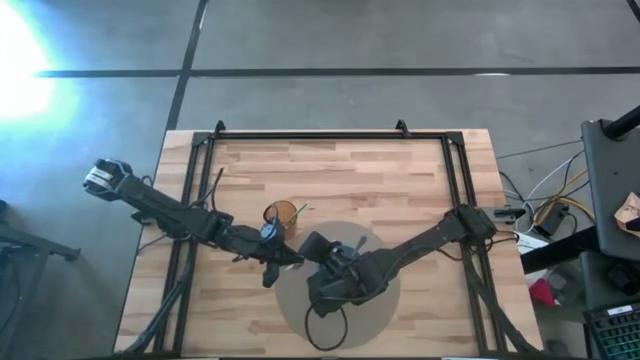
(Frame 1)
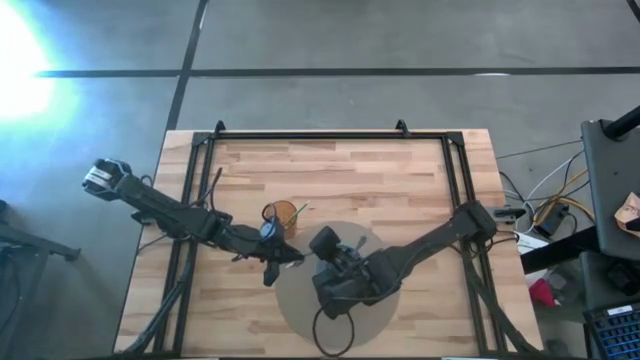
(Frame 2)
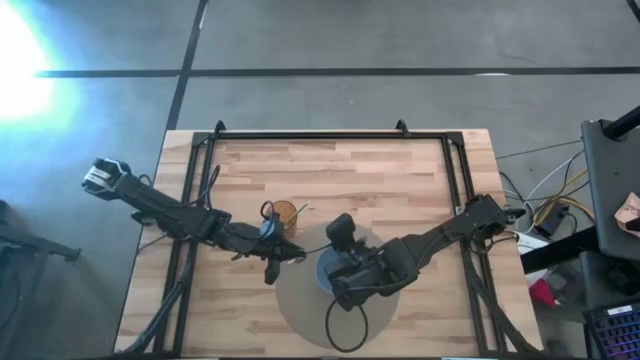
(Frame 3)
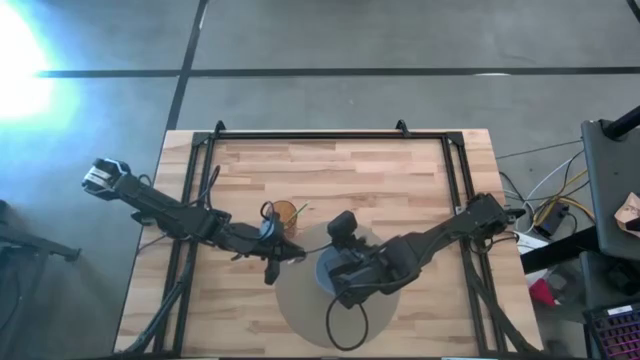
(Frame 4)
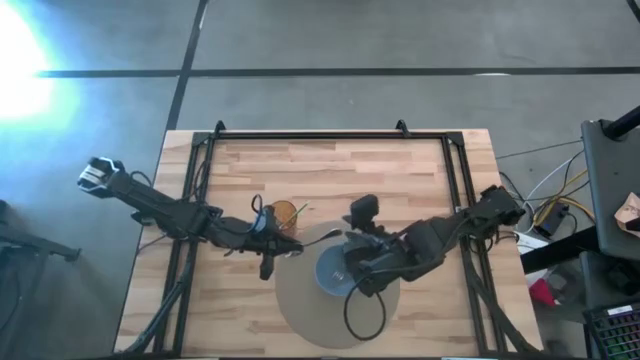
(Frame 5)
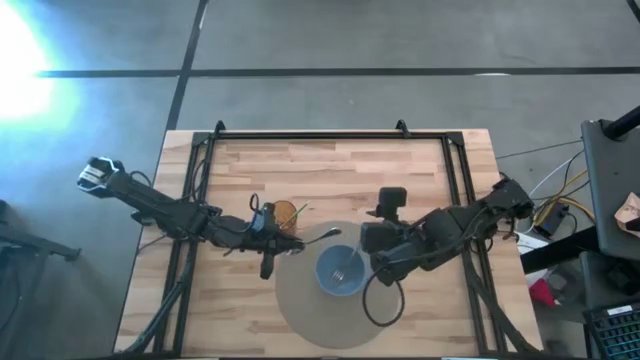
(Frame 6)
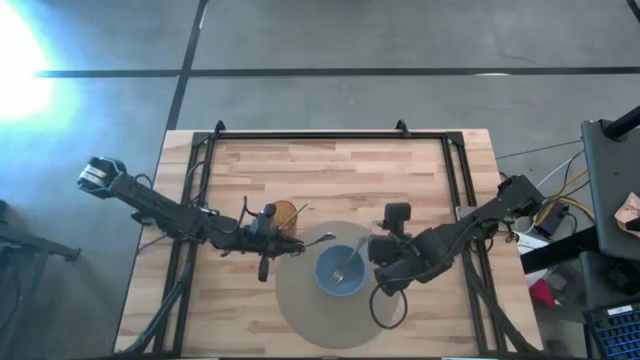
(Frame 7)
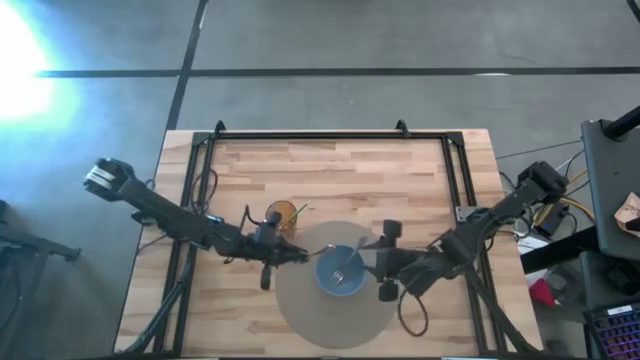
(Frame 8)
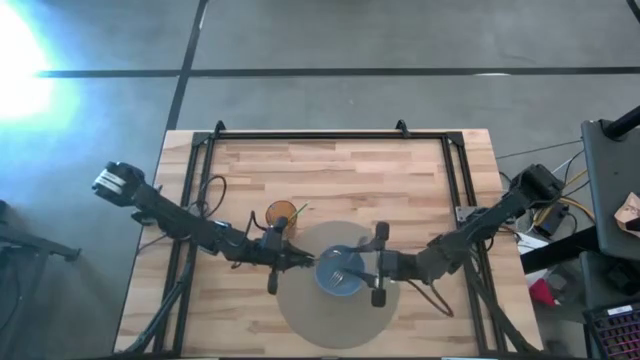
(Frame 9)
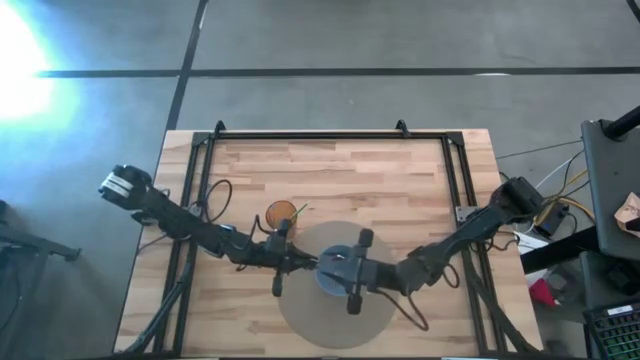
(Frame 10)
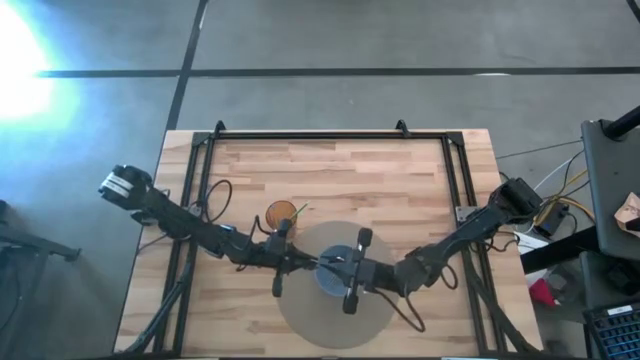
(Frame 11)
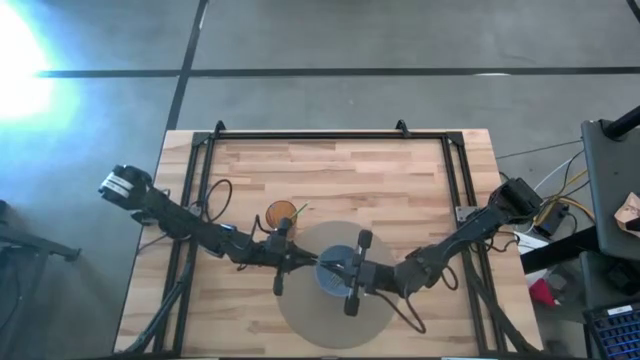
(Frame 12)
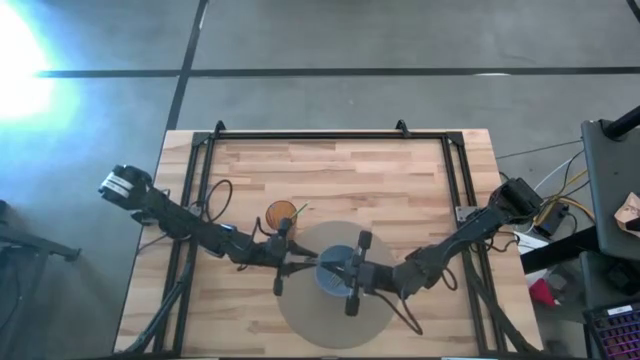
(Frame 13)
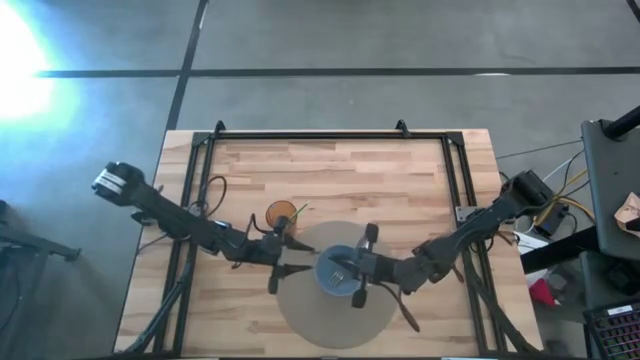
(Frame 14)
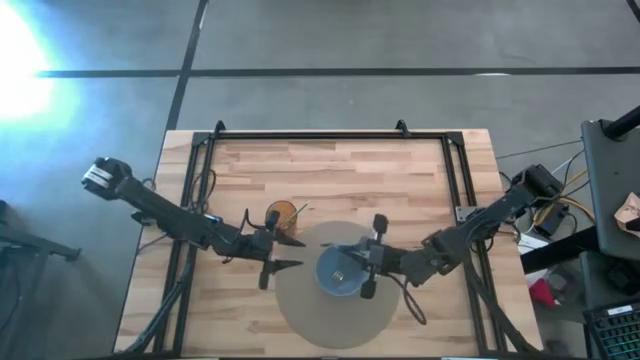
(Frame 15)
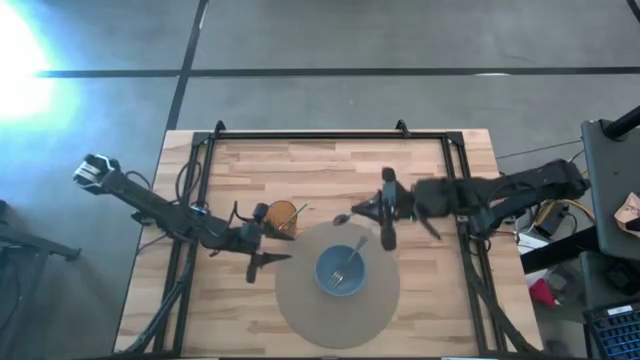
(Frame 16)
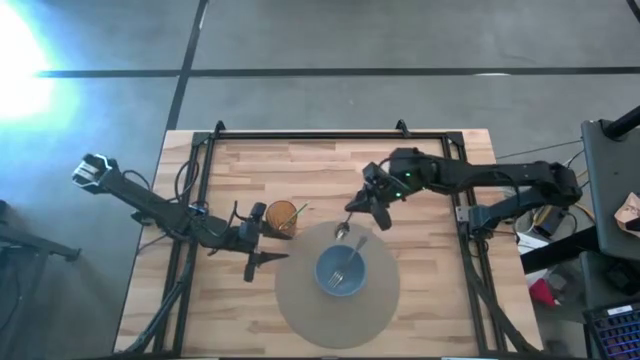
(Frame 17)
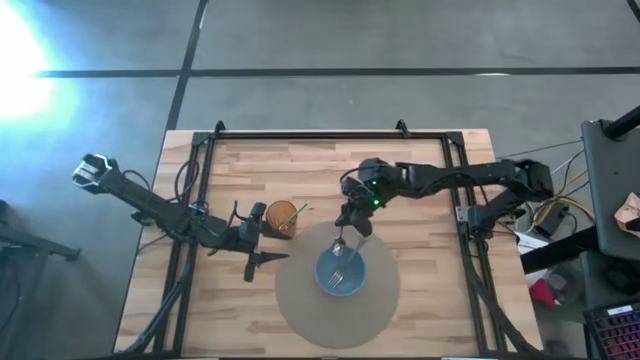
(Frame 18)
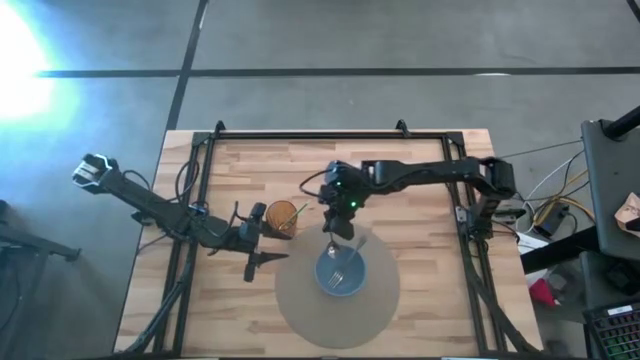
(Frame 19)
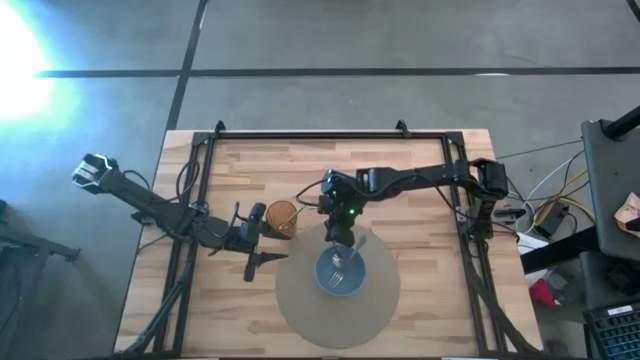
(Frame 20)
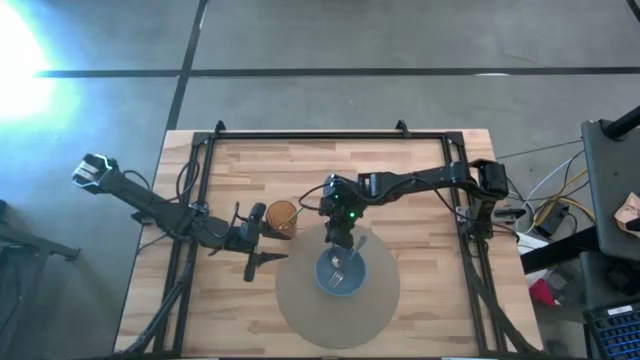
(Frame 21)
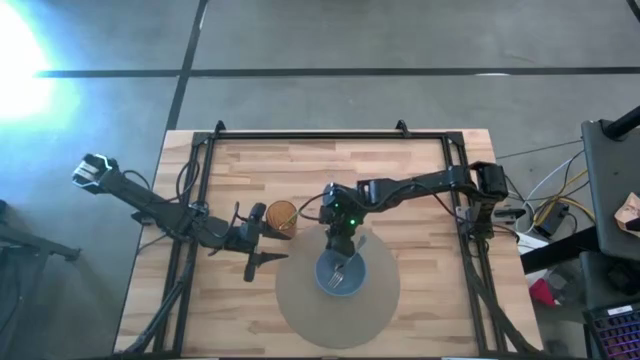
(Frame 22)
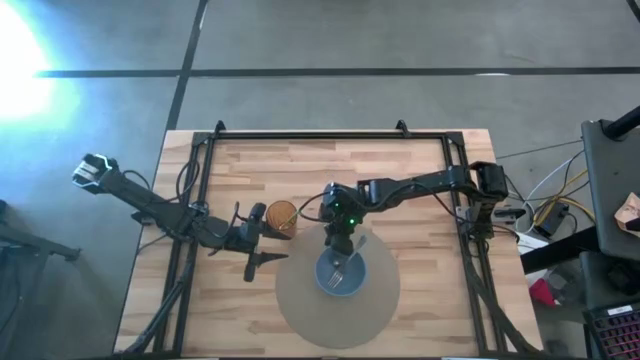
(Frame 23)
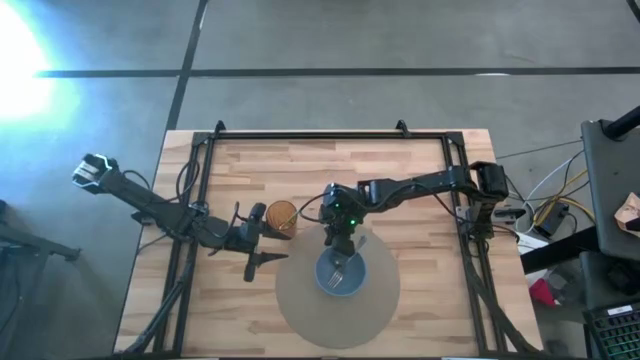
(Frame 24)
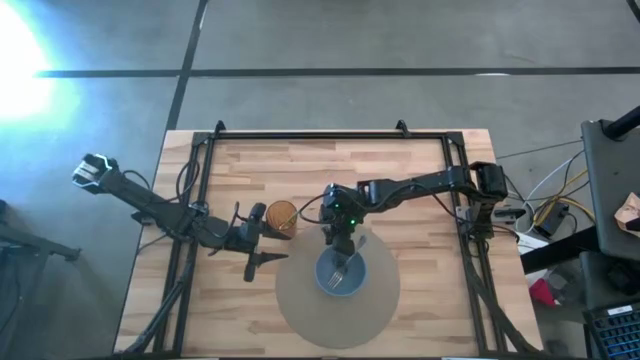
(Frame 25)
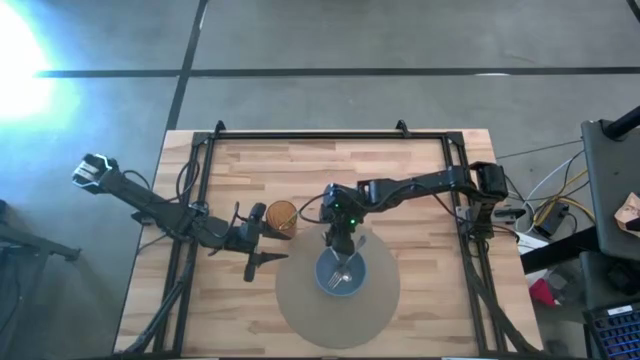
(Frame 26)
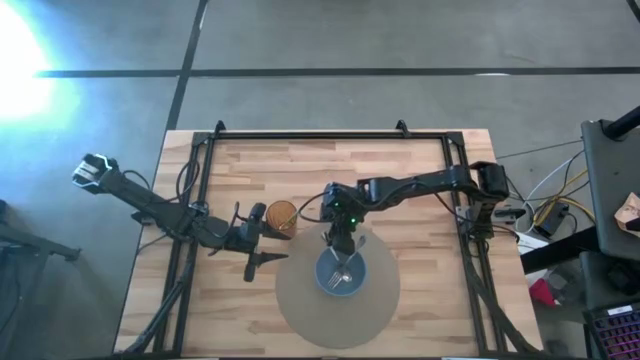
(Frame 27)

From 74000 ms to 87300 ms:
Task: Pick & Place Utensil
Put the silver spoon into the blue bowl

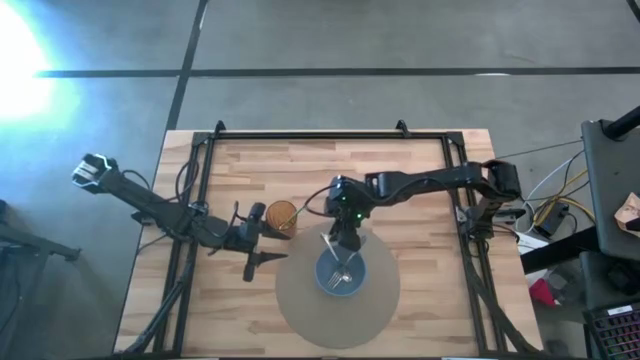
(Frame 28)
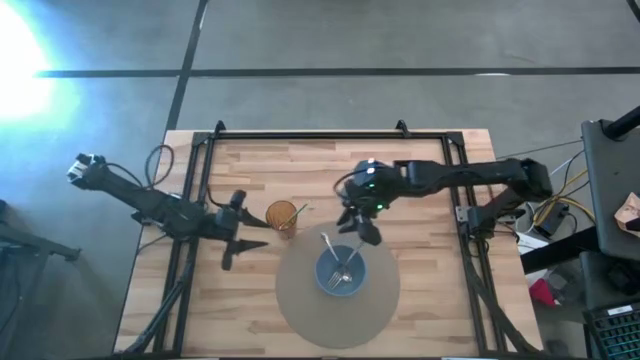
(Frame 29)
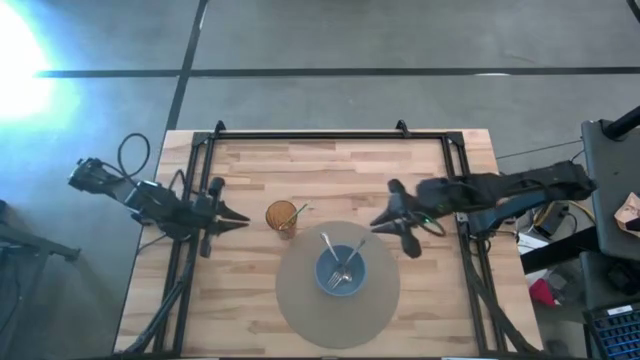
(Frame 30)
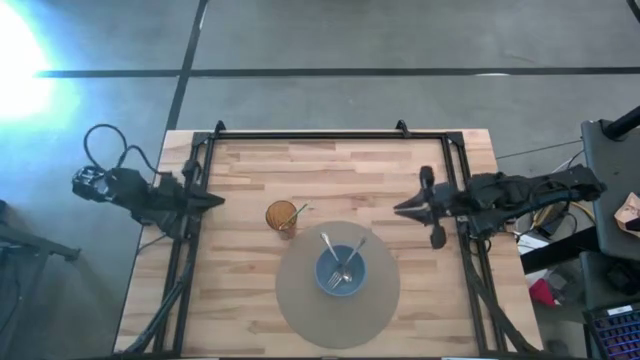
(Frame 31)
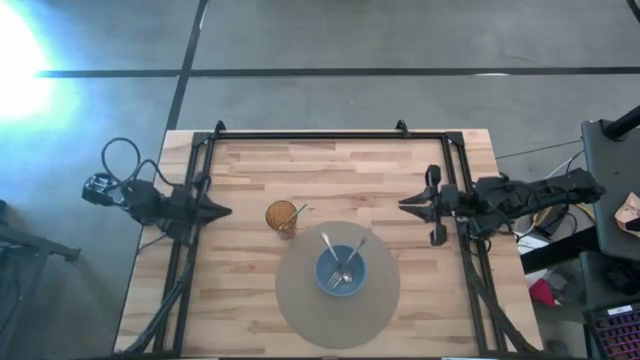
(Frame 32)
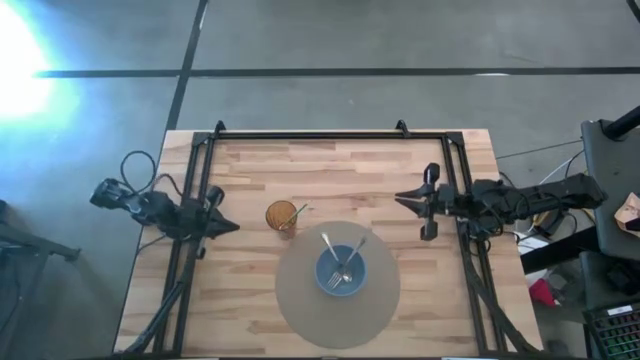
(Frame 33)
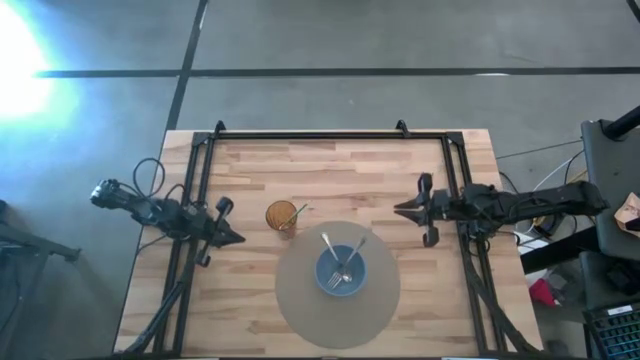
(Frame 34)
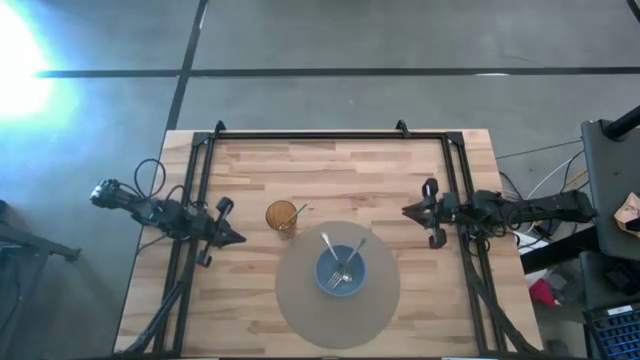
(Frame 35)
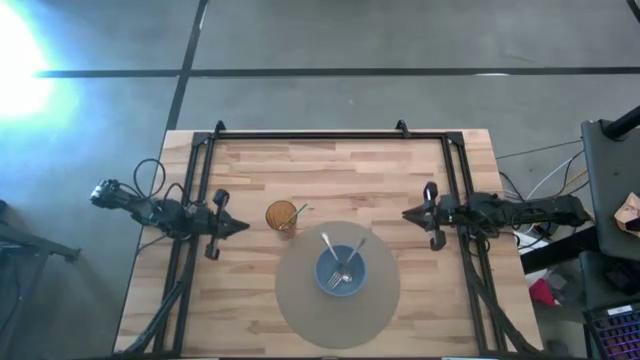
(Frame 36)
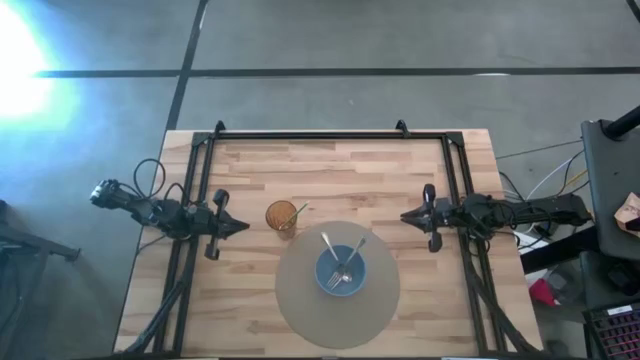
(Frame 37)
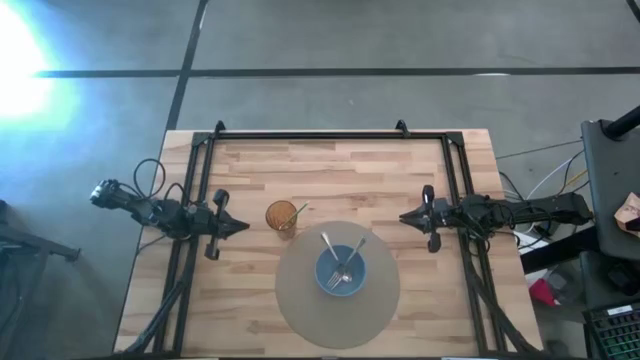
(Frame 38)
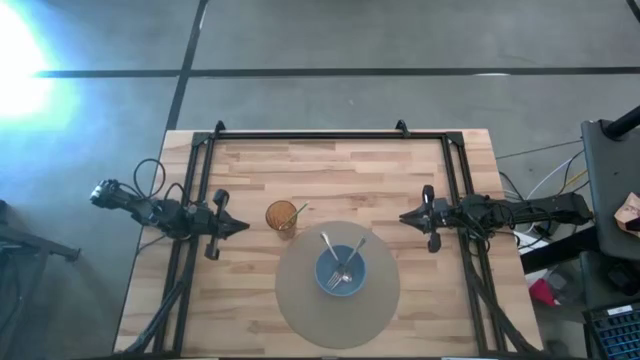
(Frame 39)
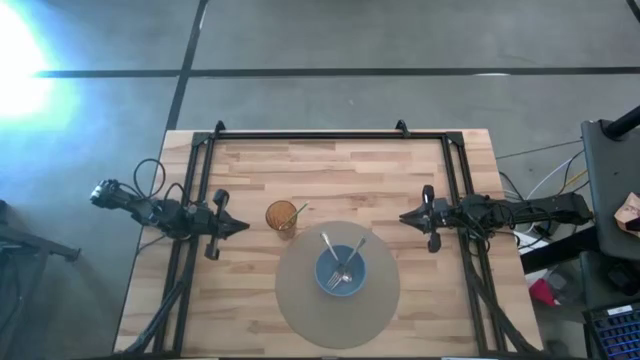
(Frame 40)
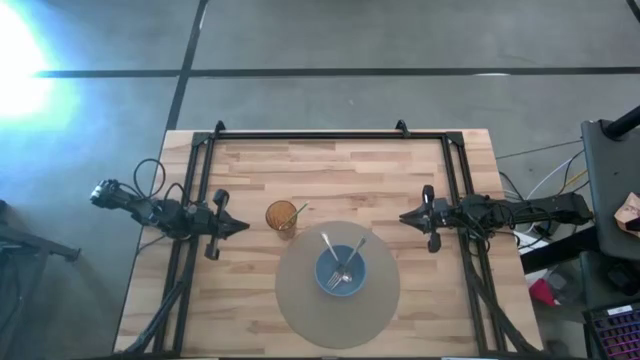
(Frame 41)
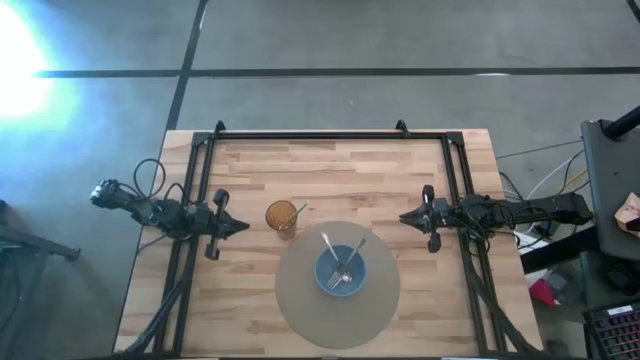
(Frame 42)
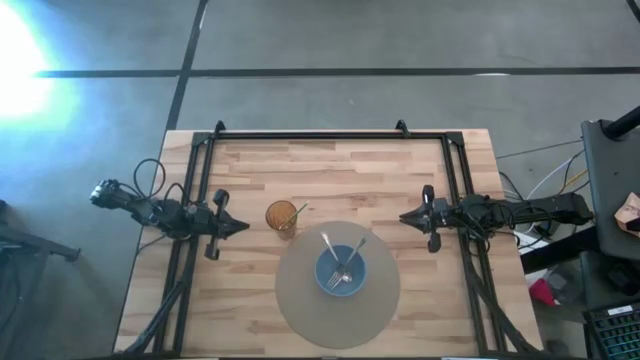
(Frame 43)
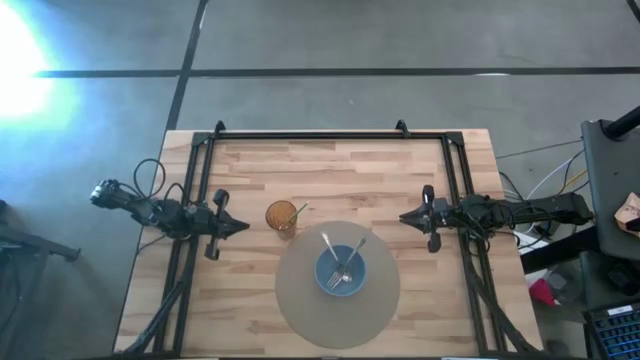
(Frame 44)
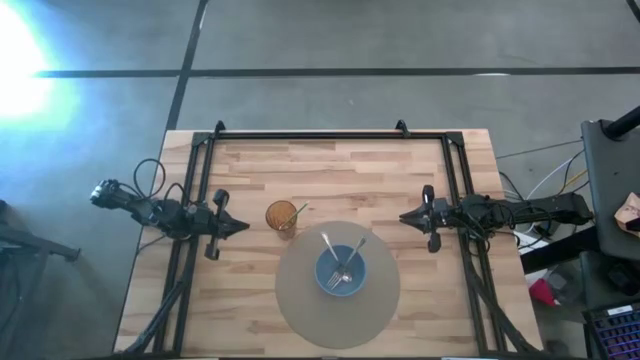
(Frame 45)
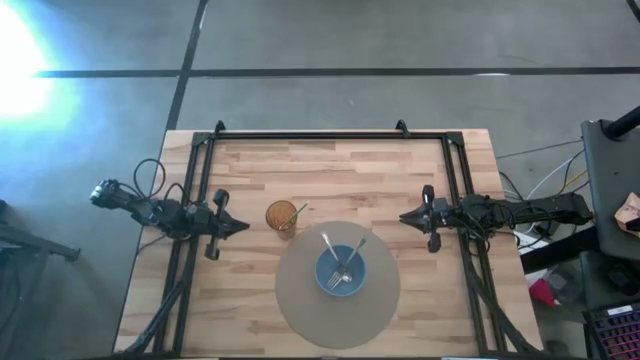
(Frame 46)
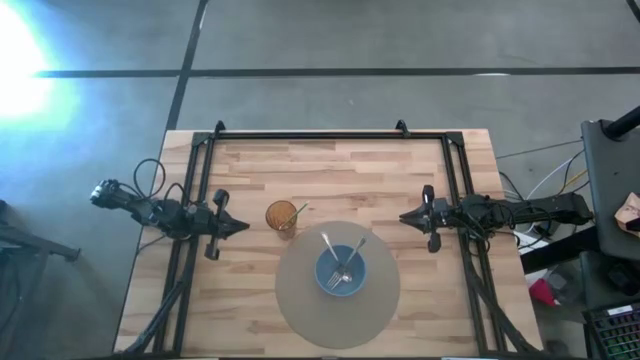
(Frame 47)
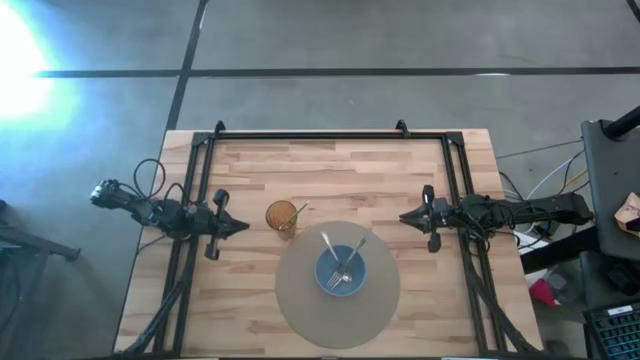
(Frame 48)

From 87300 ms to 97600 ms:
Return to Home Position
